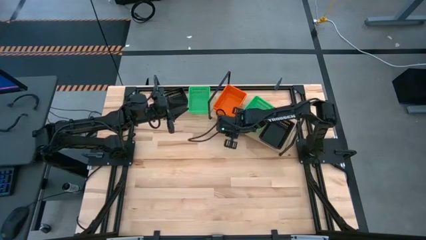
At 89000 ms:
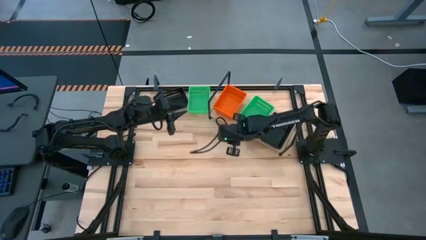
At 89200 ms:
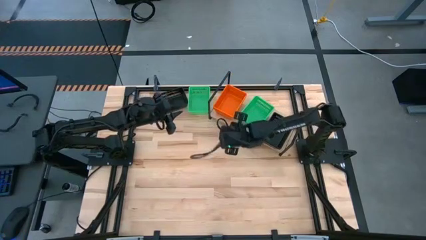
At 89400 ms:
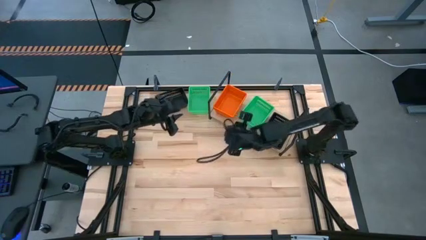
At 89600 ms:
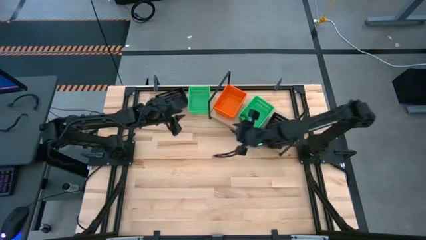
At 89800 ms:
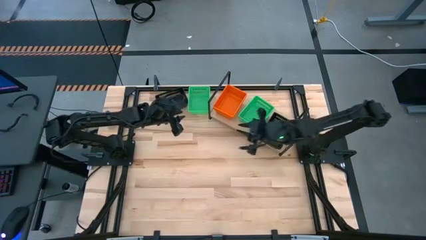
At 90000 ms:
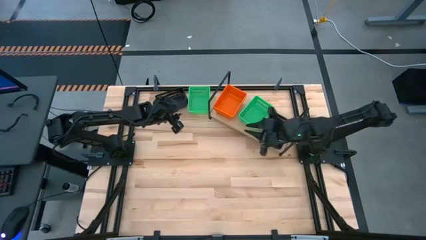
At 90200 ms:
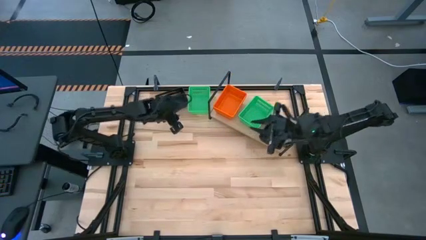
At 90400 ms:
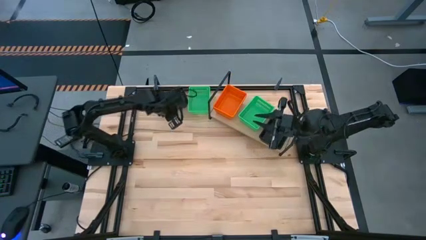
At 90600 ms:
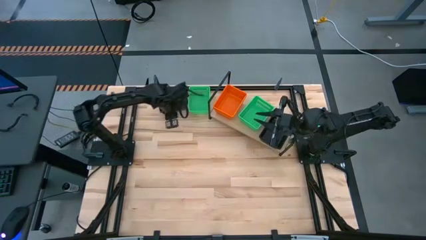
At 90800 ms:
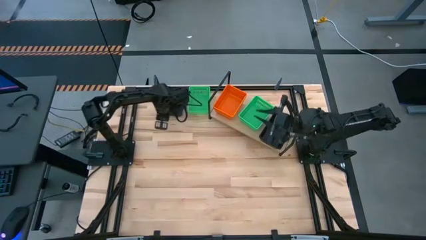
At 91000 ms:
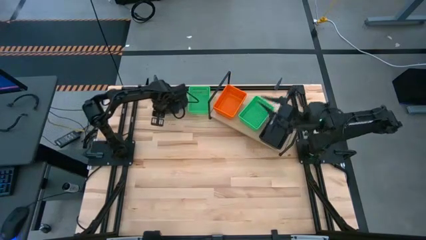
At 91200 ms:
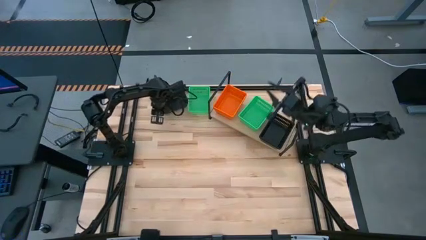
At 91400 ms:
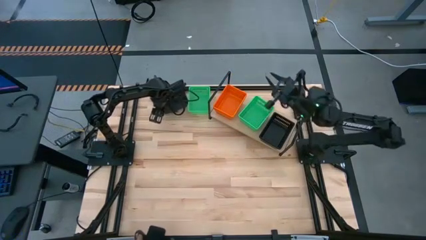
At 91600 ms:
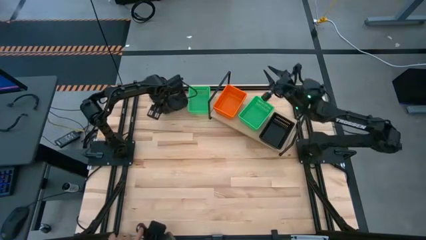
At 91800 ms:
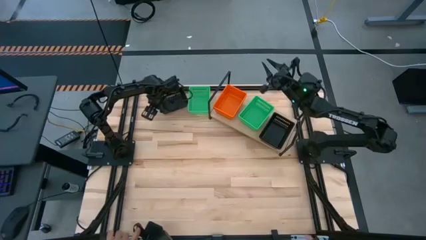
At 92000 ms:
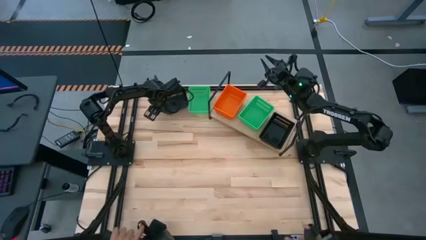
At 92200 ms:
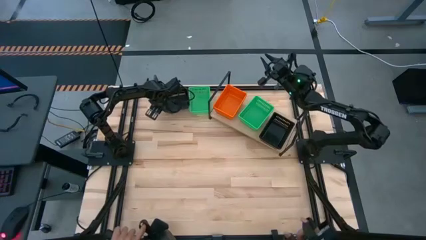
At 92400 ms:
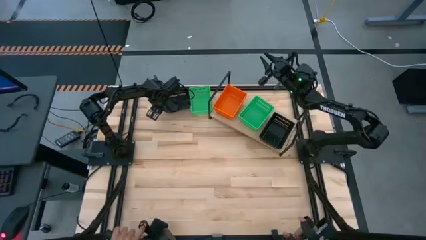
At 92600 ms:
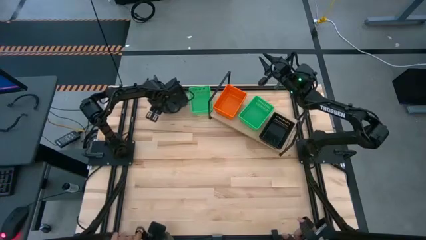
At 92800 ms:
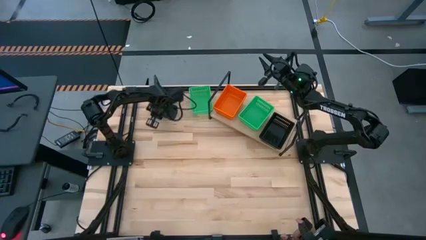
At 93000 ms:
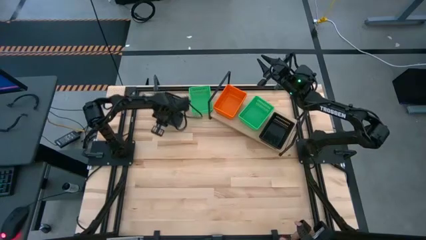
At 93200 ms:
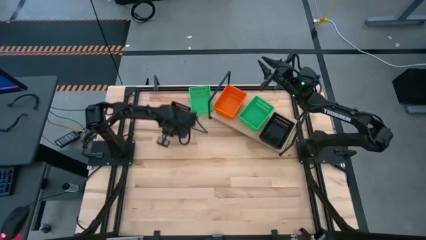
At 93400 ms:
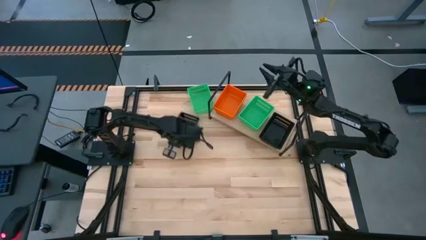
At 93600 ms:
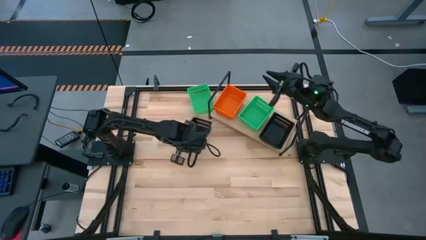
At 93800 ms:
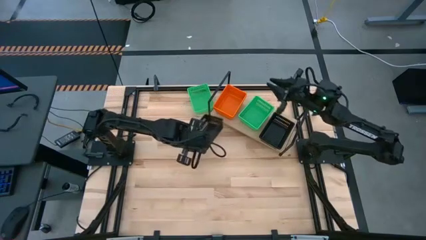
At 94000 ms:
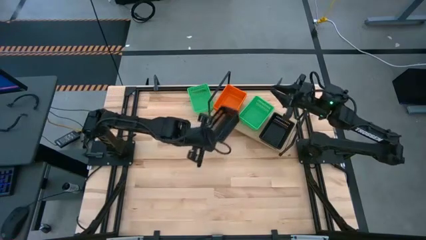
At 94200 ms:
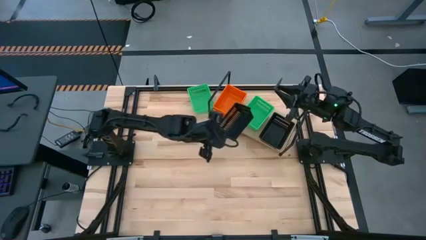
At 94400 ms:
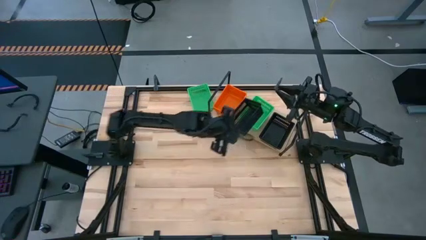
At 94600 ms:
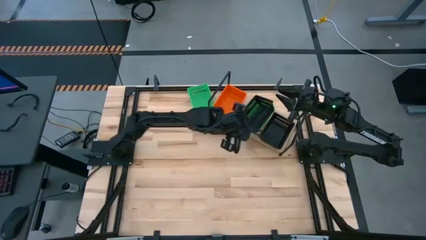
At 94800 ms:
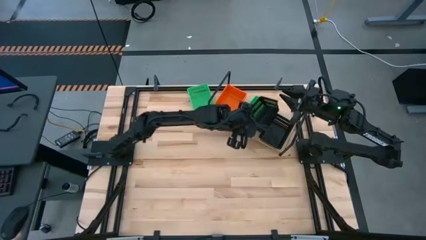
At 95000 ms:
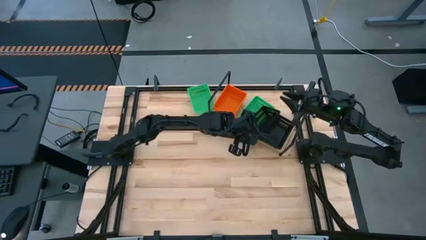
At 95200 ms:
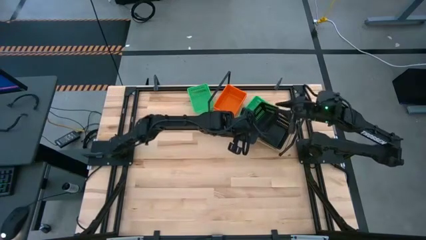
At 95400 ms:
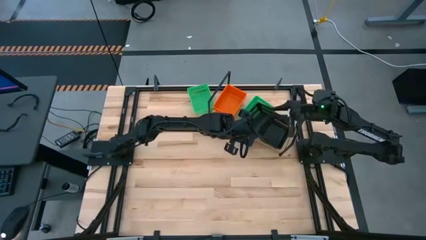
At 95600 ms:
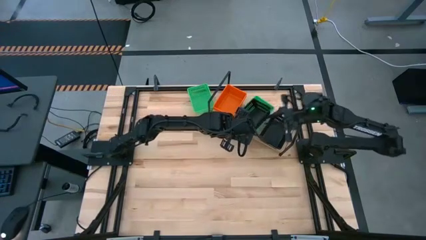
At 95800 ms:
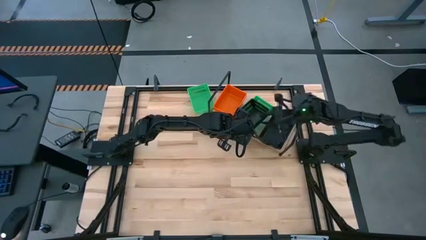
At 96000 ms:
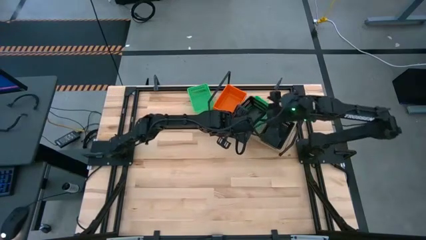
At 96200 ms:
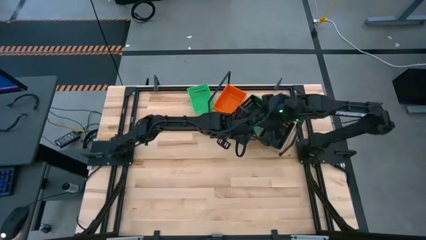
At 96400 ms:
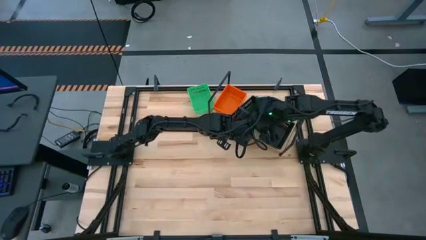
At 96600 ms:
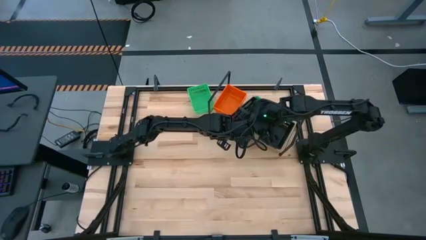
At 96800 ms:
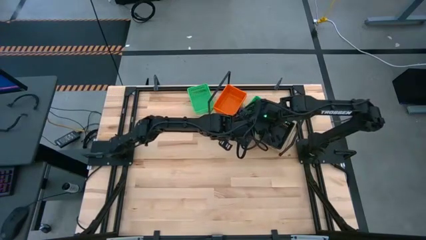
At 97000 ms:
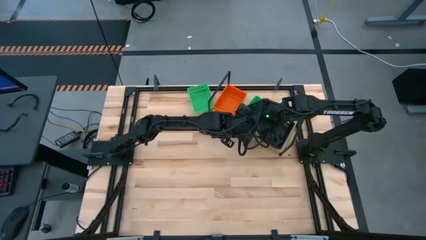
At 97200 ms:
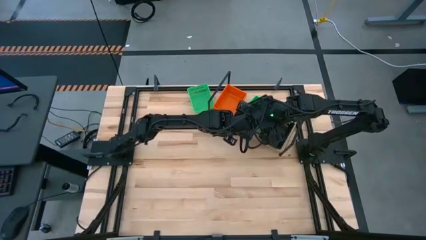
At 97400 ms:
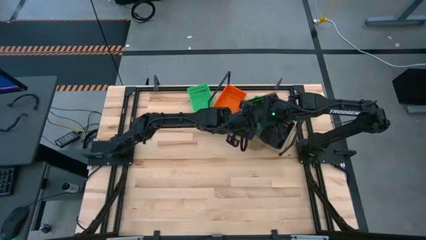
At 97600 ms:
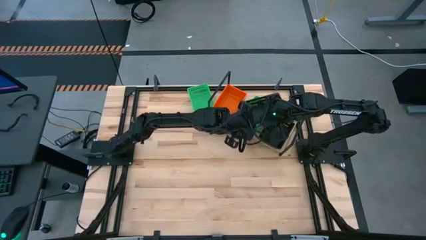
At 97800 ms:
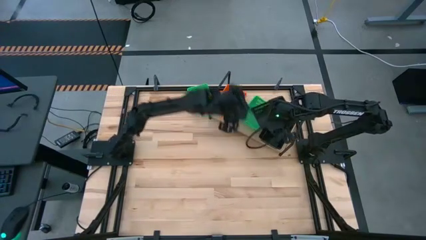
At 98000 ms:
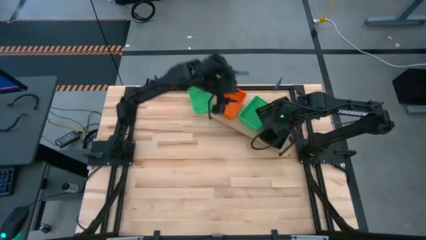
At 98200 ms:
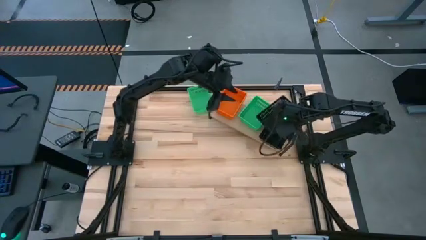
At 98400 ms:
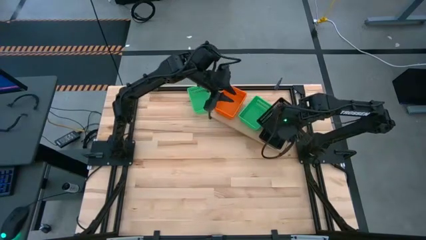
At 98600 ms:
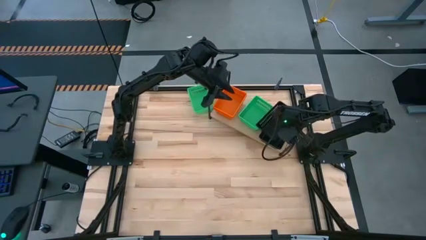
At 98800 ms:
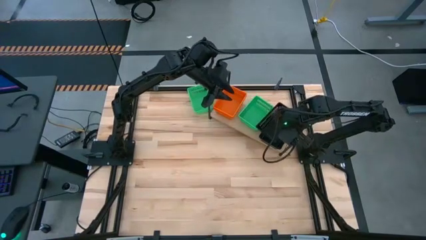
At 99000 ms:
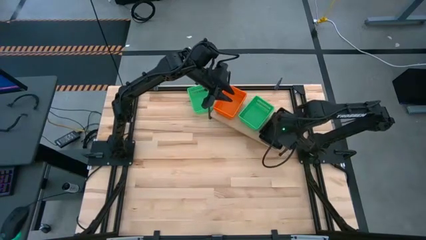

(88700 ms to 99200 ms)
Task: Stack baskets on shelf by color
Stack the black basket on top of the black basket on the shelf

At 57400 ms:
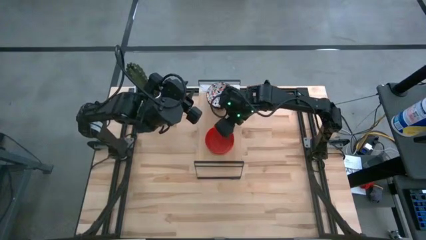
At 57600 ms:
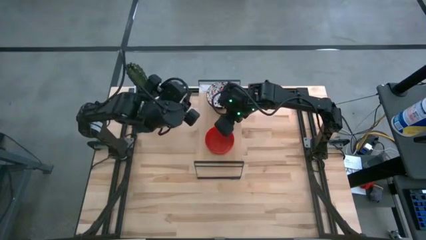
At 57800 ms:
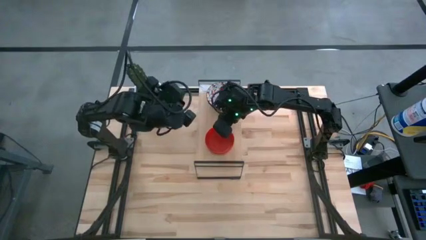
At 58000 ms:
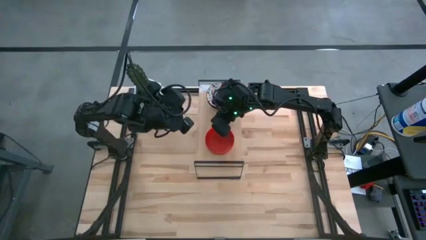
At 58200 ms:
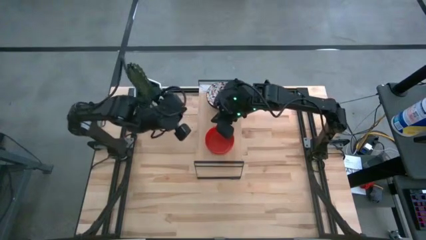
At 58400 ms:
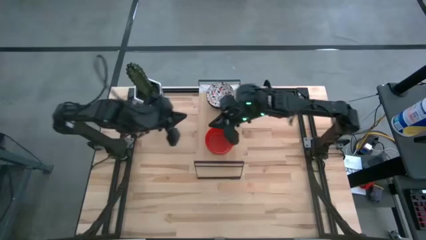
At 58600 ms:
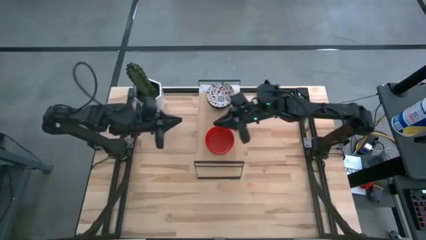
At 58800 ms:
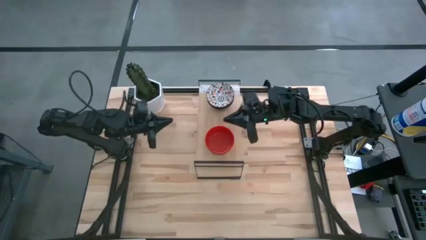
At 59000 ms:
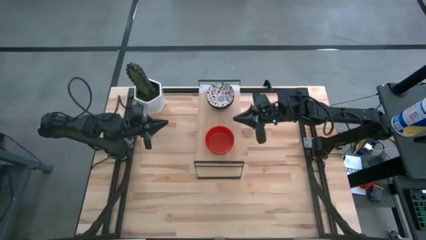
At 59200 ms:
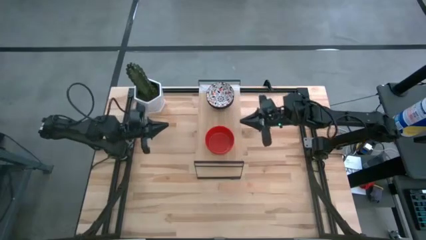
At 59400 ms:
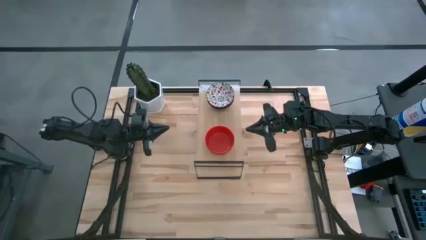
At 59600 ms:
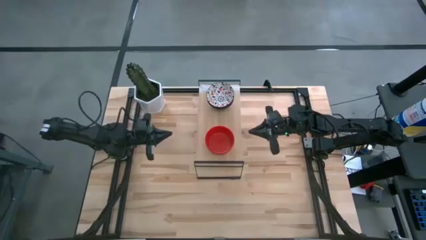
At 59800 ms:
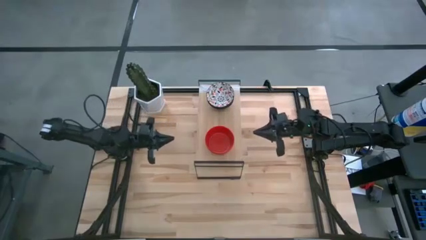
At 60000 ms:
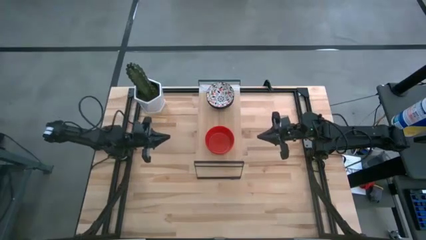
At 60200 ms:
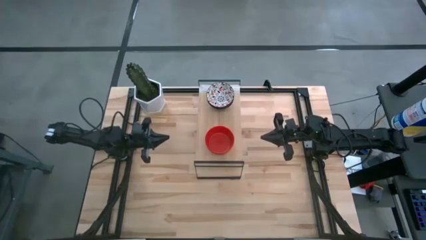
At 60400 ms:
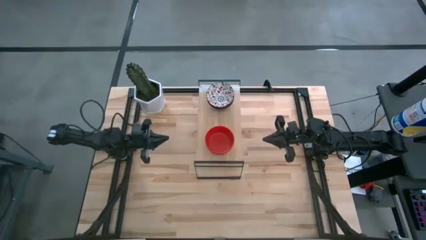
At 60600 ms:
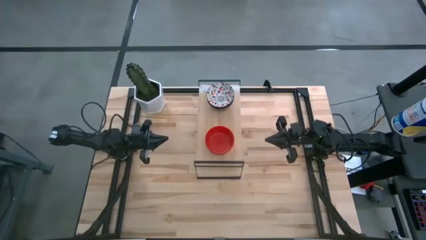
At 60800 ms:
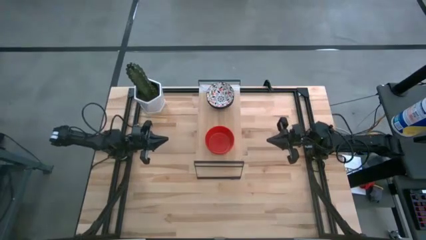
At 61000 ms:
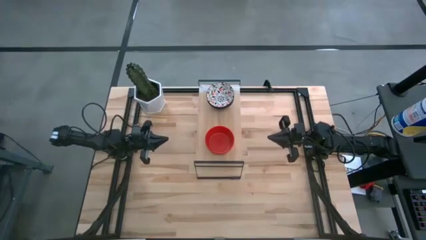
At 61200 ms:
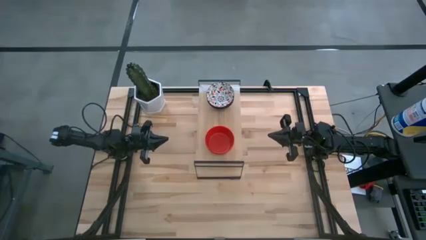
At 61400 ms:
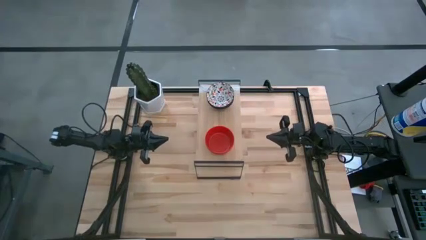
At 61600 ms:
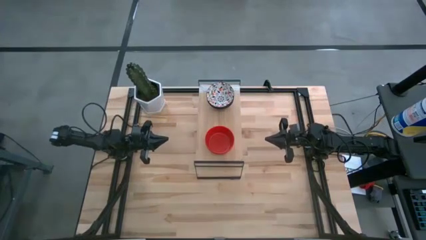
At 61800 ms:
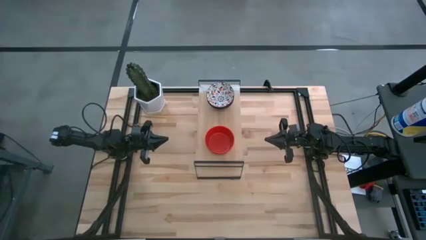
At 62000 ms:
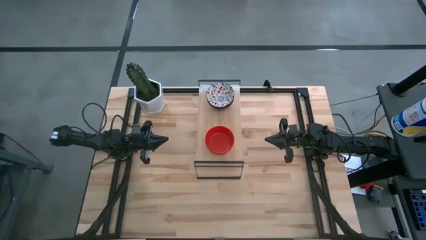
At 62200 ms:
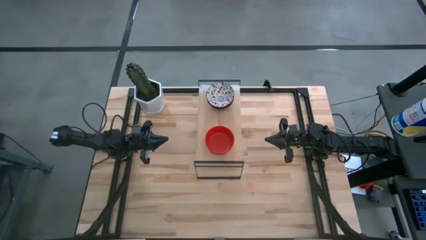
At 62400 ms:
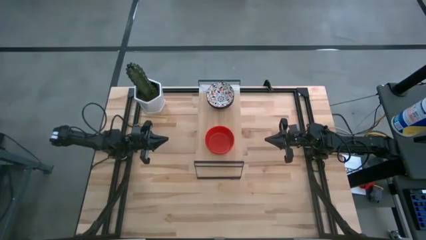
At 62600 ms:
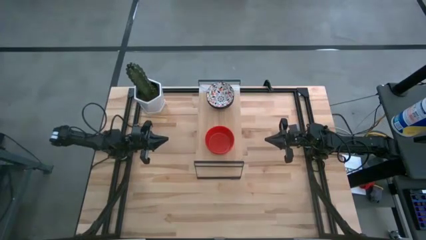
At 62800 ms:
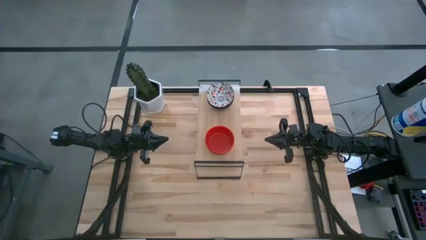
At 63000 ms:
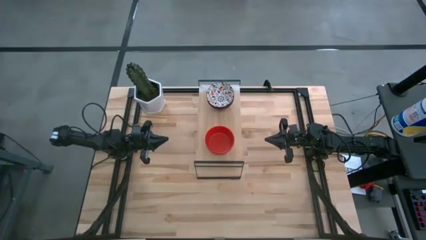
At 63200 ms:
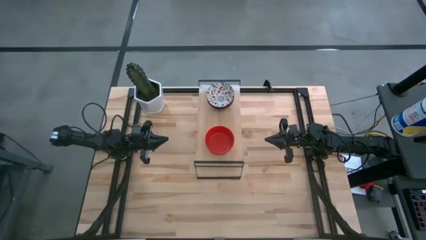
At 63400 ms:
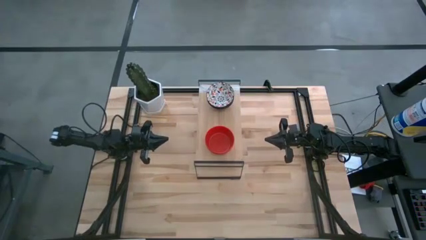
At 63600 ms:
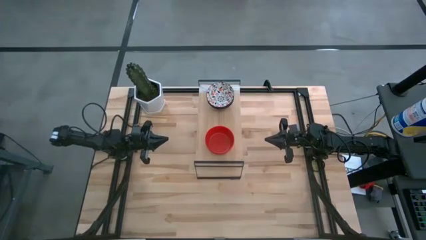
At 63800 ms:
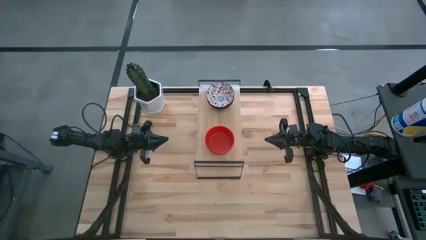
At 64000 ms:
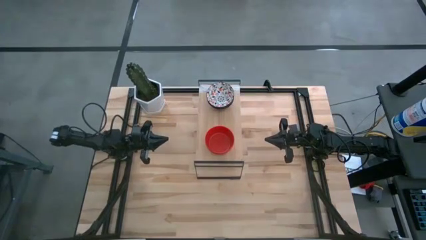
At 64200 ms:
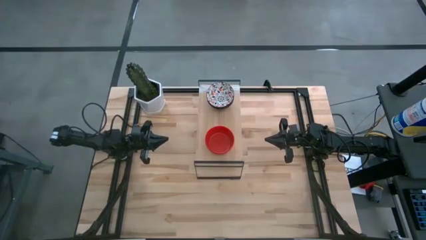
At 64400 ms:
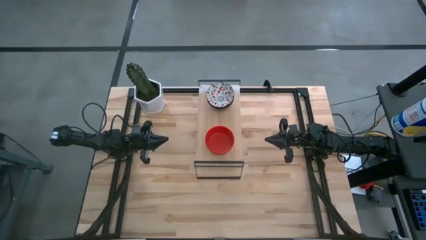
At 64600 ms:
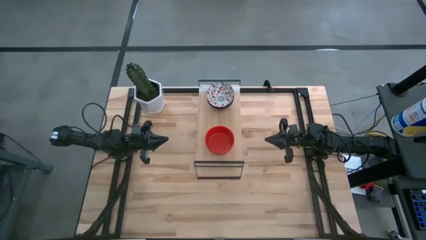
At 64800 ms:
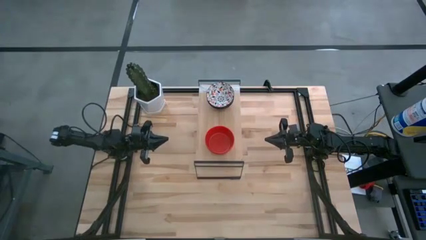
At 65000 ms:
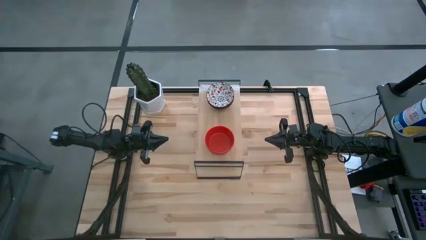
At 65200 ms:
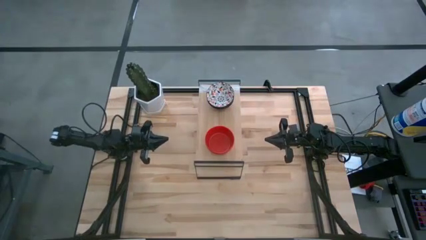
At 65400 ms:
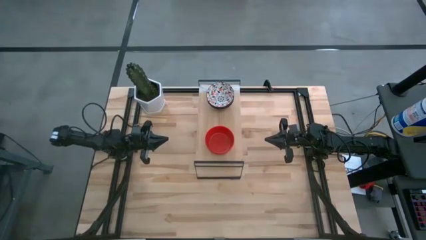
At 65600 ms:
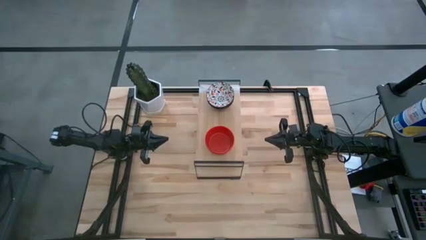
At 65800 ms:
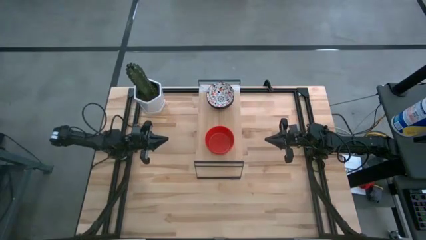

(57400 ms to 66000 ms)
Task: Pick & Place Mini bowls
Return to Home Position
